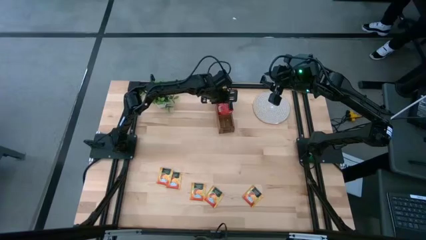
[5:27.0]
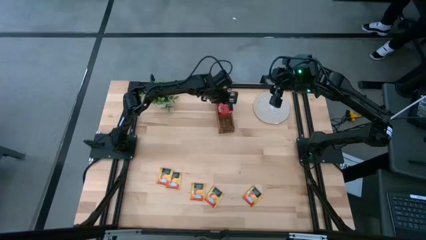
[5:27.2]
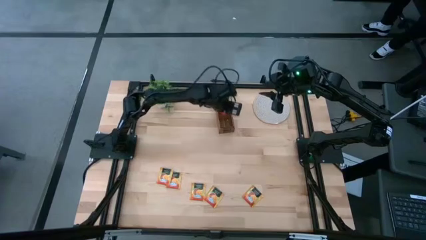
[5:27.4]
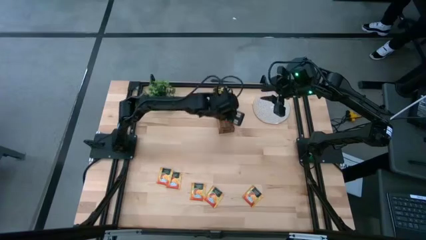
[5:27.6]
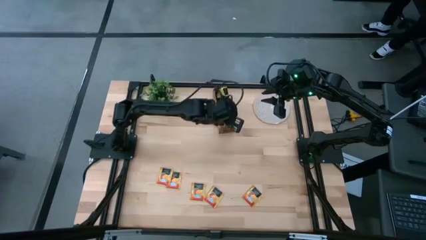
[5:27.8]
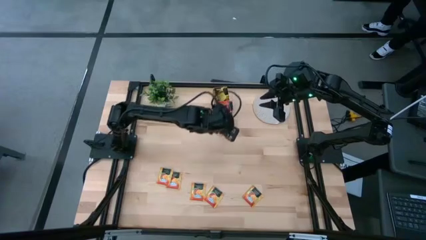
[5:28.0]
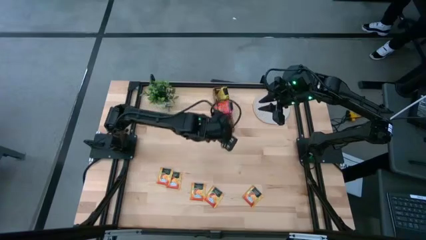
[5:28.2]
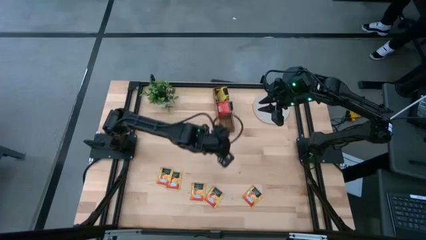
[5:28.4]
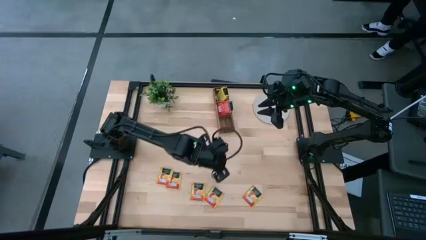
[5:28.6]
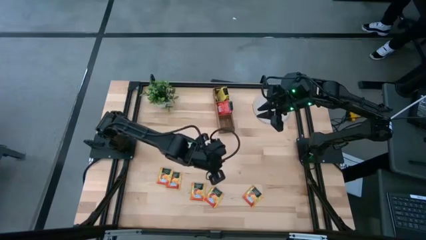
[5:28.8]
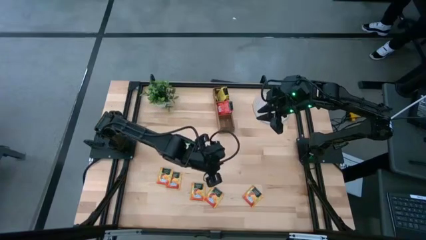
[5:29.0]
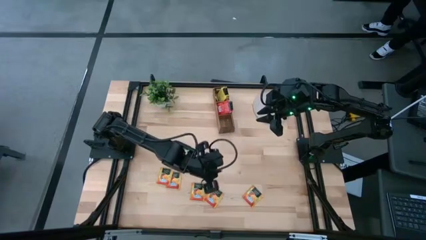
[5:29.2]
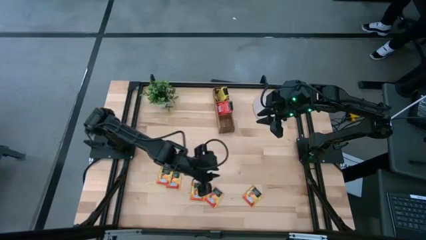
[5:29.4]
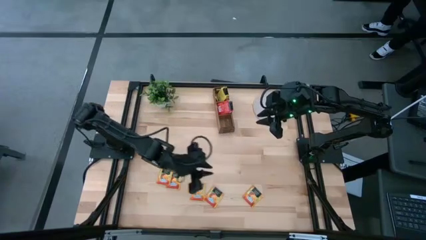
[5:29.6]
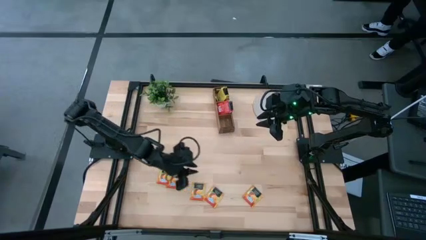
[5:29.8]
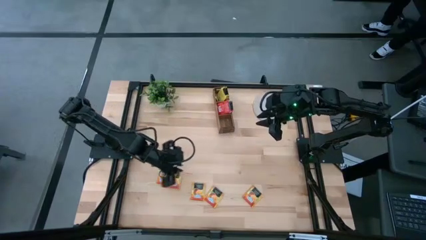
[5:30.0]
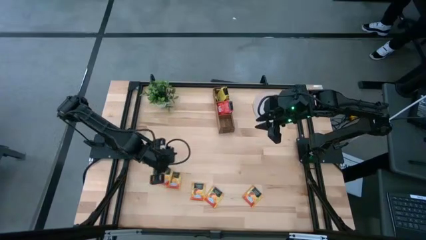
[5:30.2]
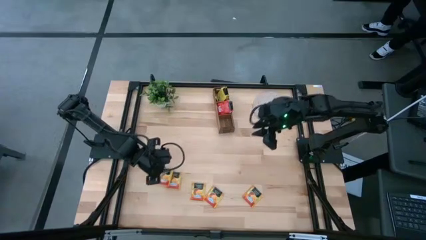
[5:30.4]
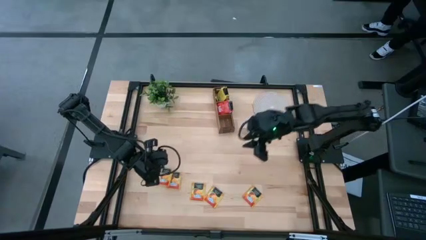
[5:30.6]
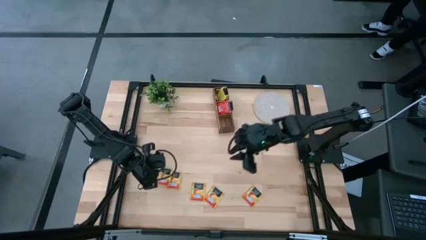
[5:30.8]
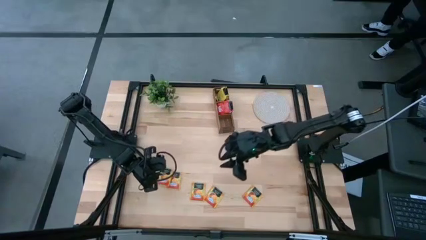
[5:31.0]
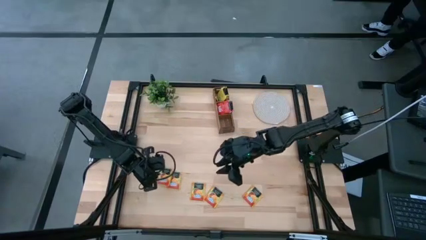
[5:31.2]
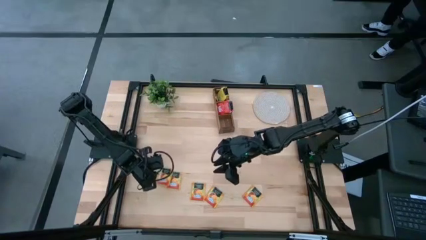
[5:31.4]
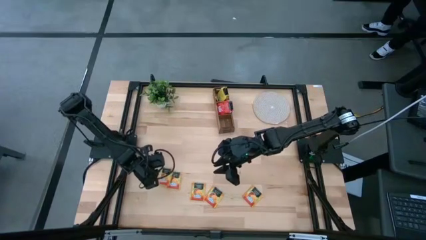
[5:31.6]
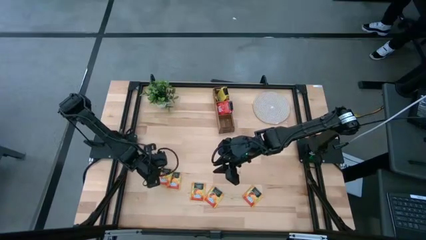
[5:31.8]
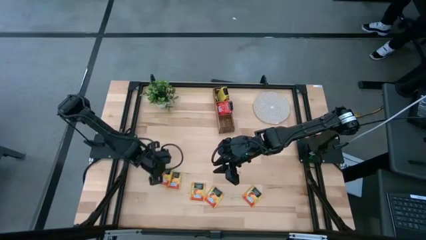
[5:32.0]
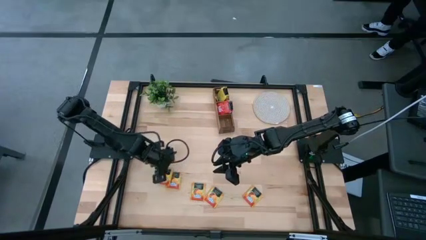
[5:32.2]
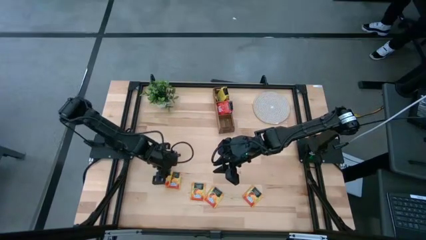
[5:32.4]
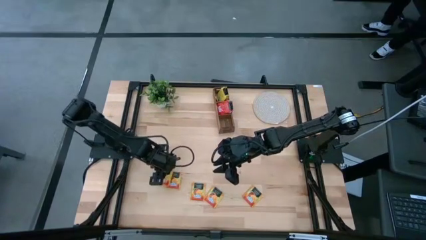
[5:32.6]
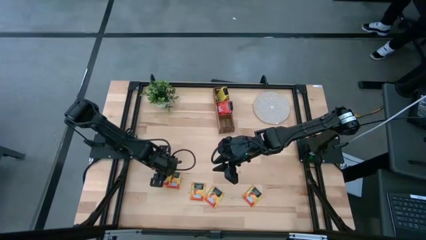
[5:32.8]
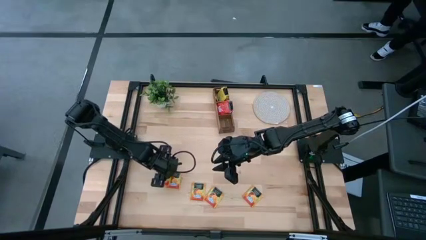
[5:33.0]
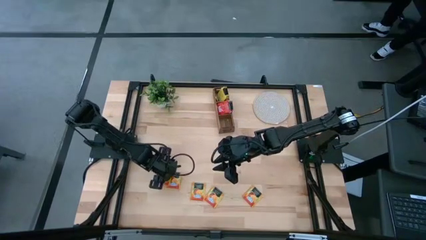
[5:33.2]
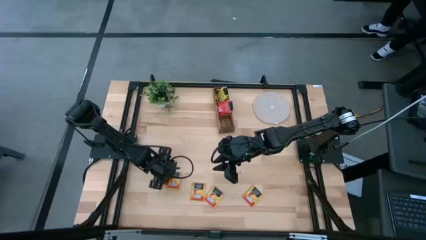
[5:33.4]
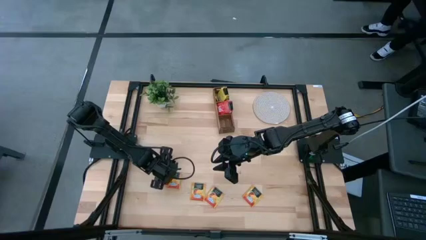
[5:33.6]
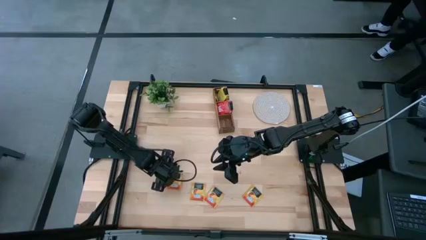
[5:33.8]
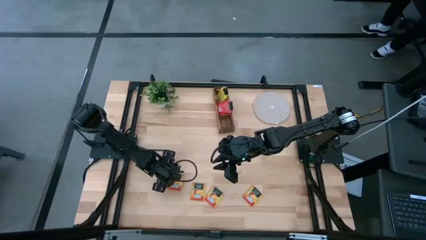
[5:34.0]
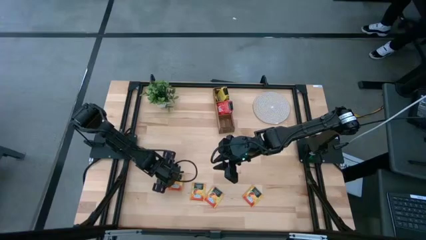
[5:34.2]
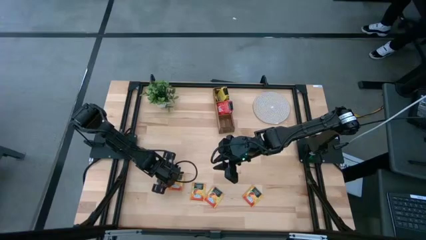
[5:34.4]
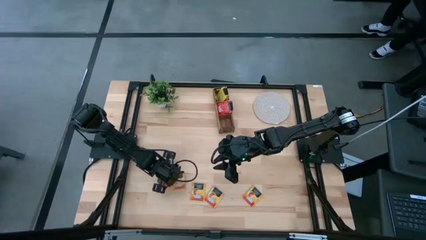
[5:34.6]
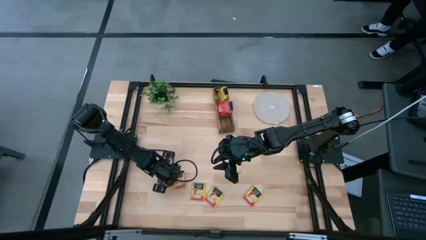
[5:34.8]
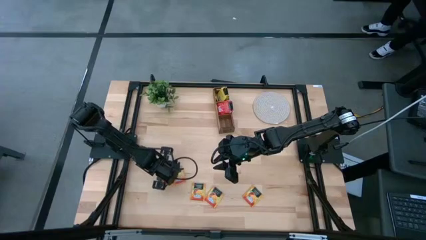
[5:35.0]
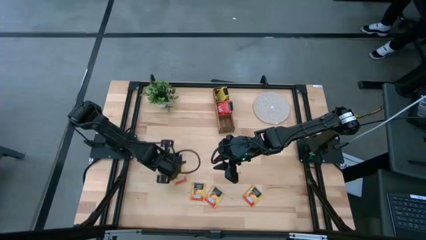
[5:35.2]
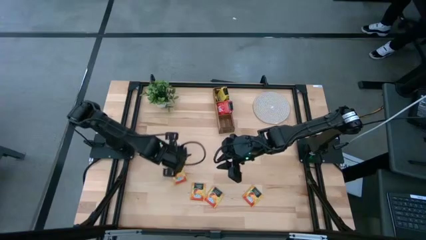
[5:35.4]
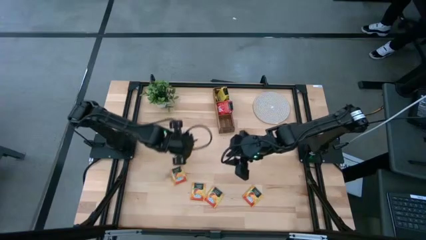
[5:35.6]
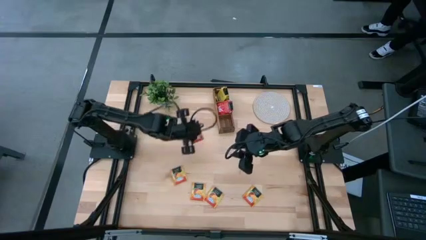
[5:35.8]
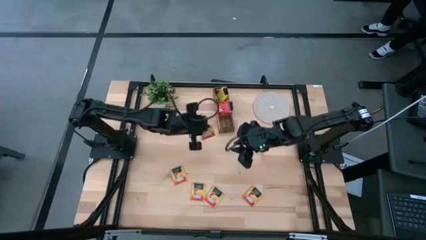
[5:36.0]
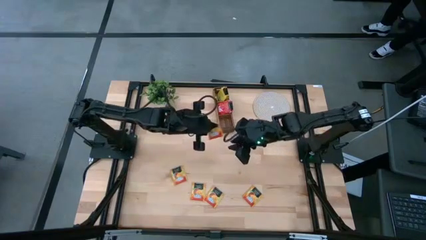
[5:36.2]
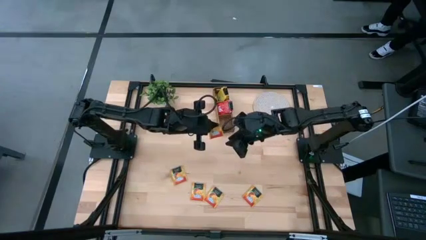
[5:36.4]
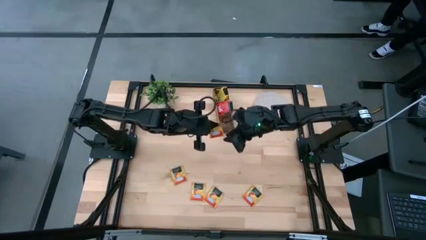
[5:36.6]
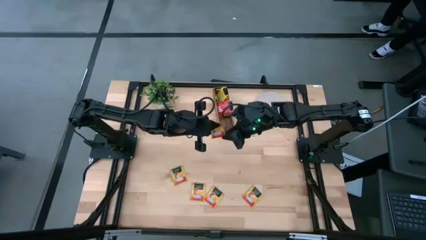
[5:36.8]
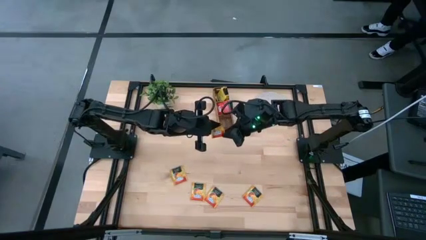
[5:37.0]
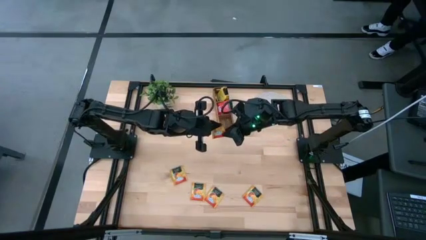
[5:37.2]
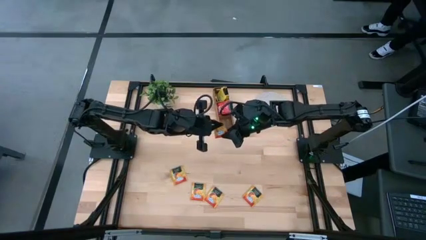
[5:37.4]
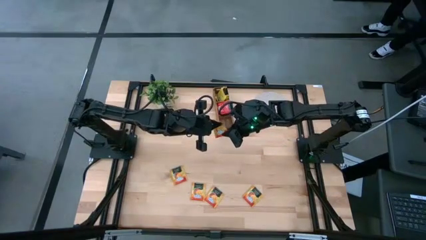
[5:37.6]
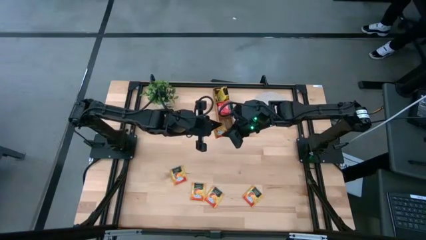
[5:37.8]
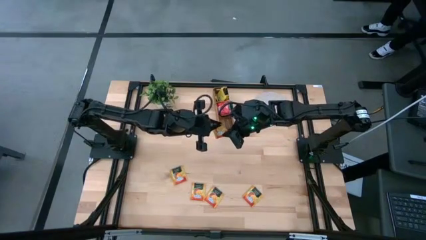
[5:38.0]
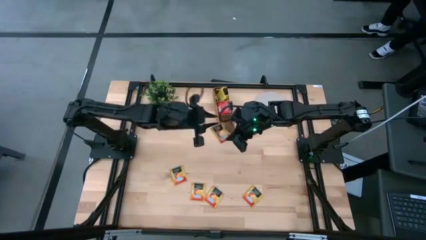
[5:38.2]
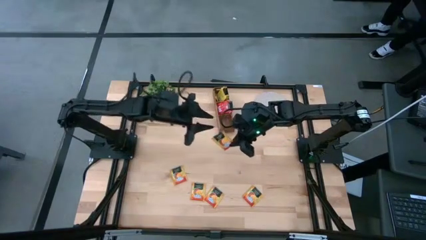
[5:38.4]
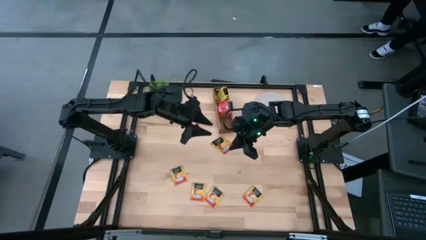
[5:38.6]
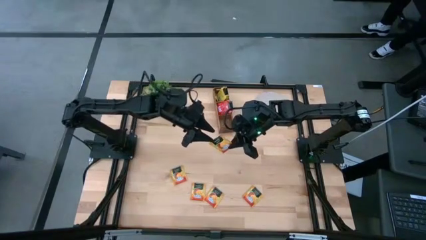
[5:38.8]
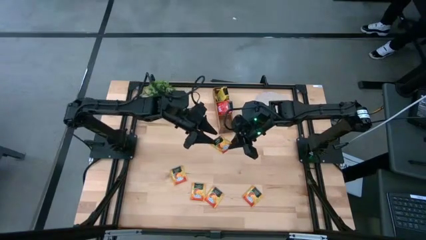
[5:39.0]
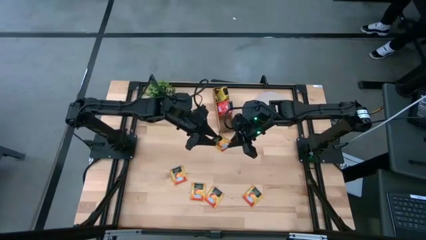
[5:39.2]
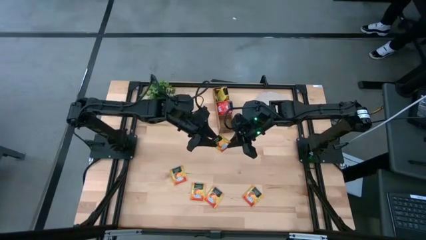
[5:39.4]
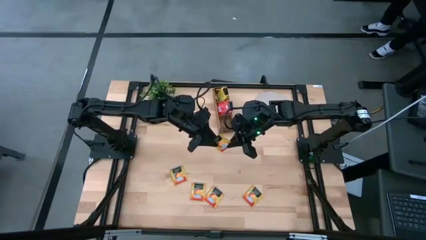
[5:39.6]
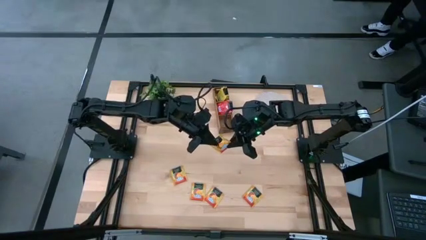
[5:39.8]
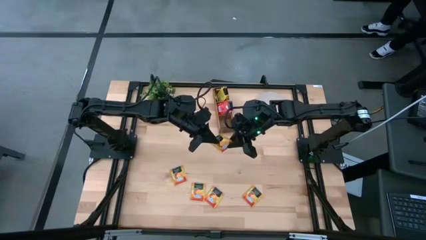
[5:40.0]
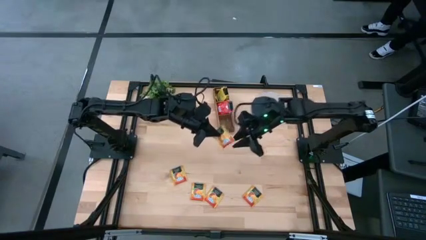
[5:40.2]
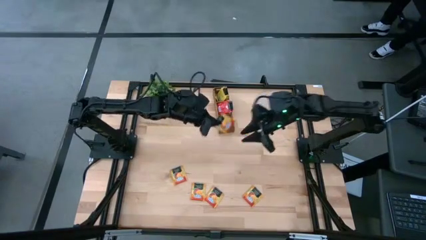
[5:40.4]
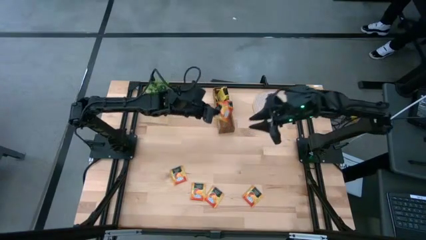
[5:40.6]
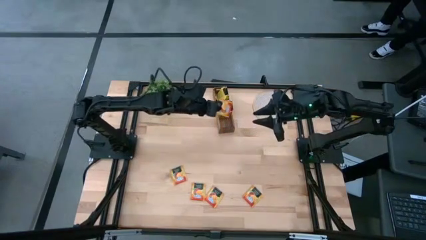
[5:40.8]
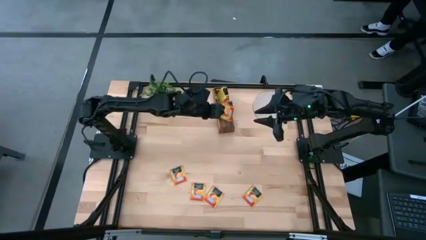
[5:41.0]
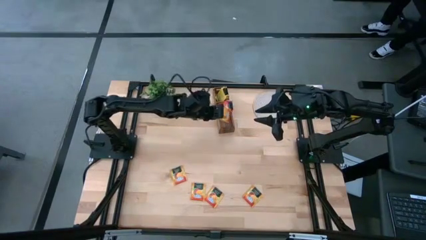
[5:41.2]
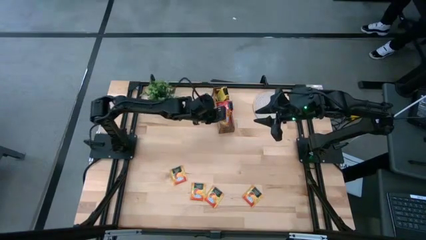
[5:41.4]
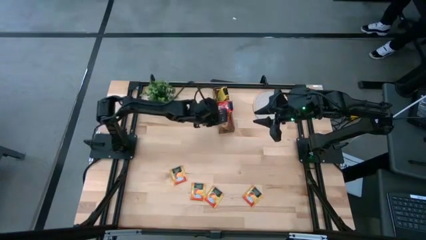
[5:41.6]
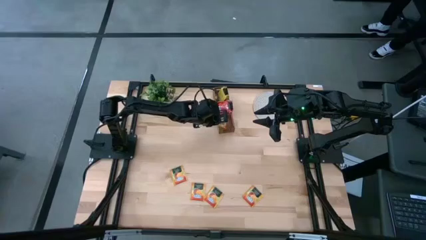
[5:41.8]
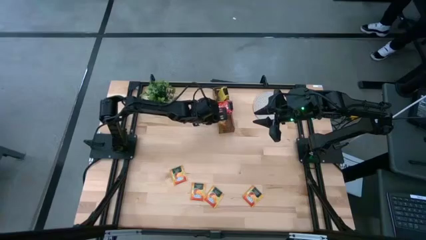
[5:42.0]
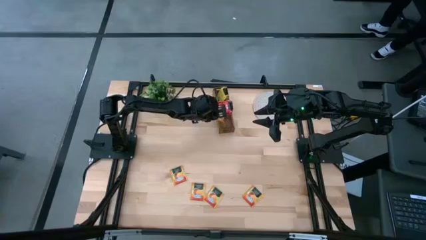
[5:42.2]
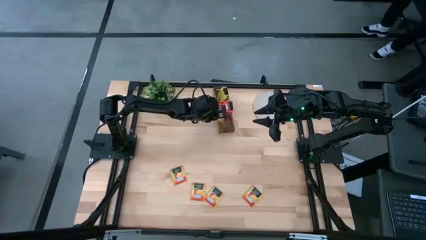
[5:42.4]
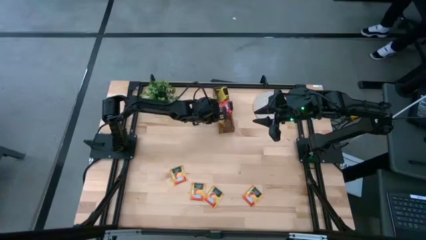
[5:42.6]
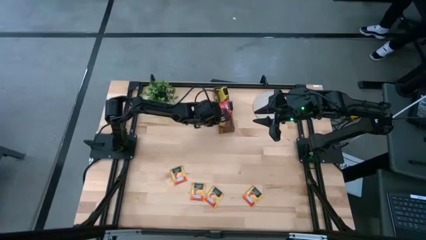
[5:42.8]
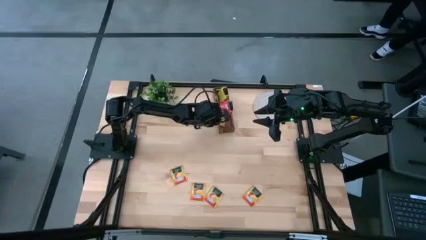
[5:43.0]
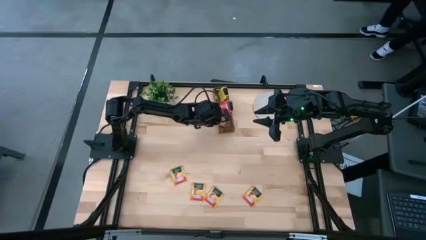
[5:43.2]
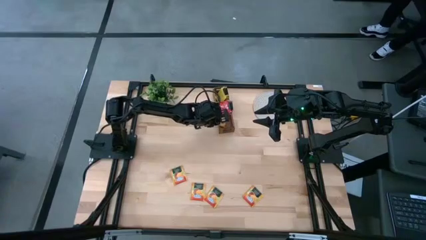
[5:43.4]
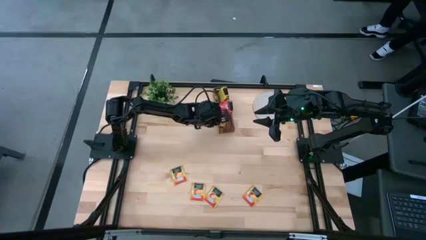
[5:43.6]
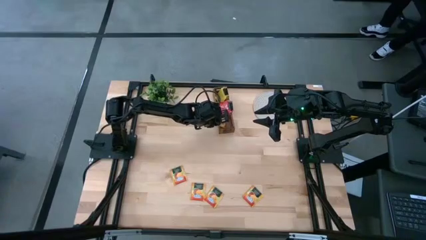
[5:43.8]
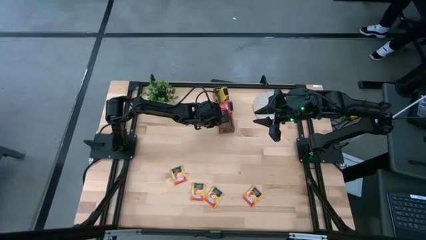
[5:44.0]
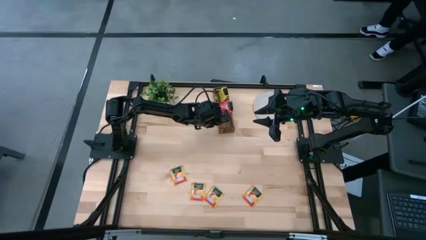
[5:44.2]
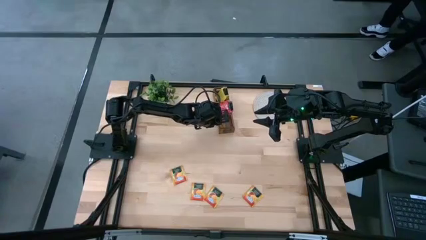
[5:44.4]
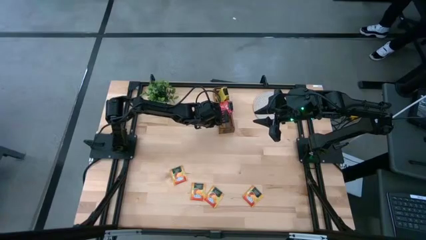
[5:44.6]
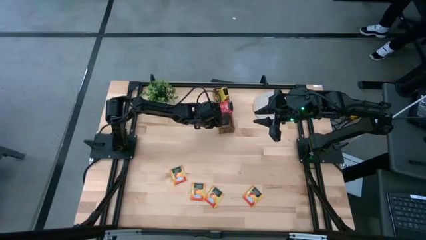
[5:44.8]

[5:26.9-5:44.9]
Task: Pick & Place Tea
Put the orange tea bag into the left section of the wooden organizer
